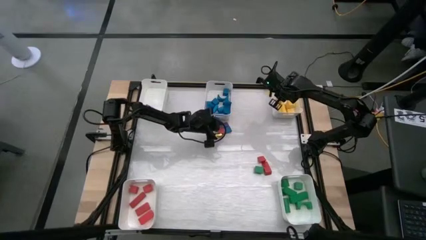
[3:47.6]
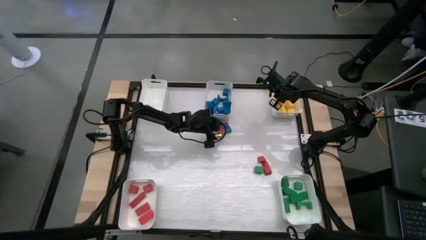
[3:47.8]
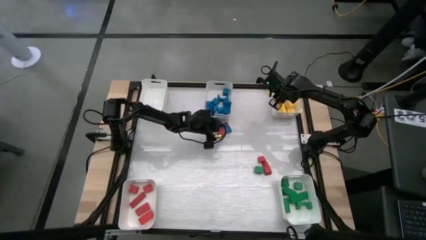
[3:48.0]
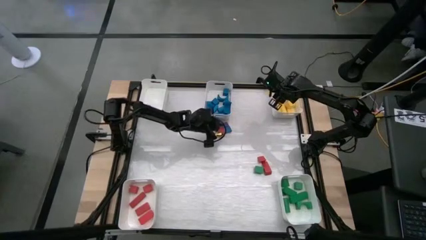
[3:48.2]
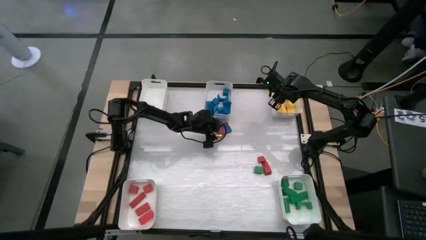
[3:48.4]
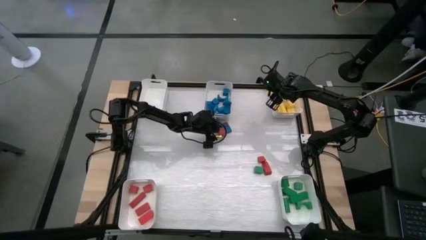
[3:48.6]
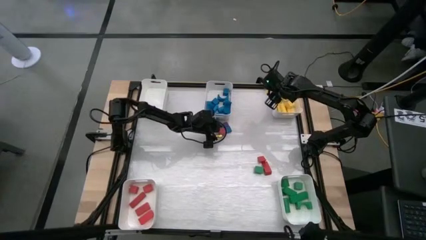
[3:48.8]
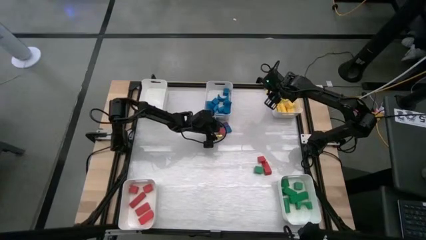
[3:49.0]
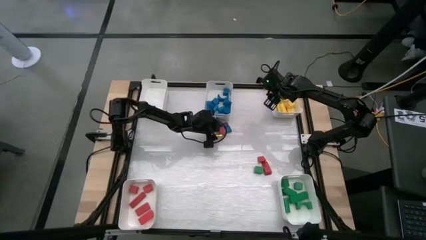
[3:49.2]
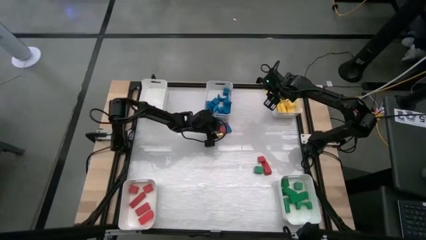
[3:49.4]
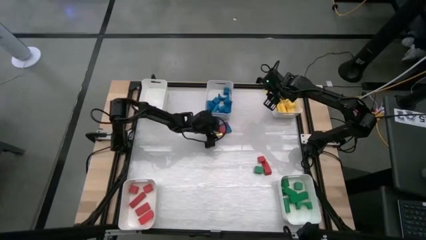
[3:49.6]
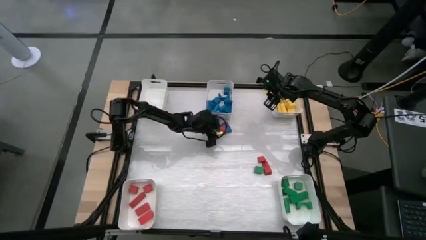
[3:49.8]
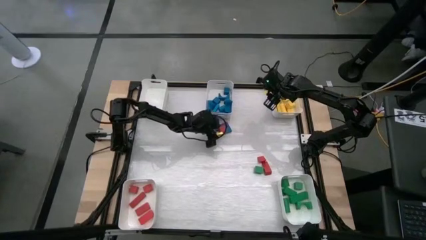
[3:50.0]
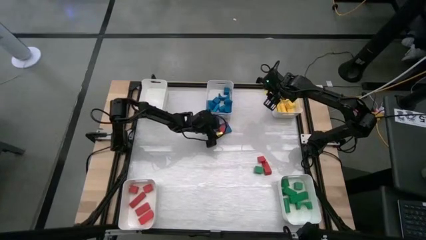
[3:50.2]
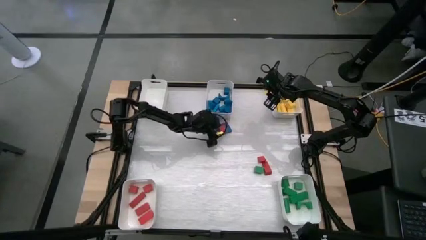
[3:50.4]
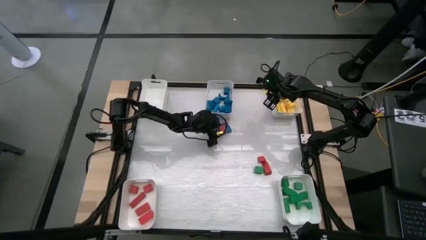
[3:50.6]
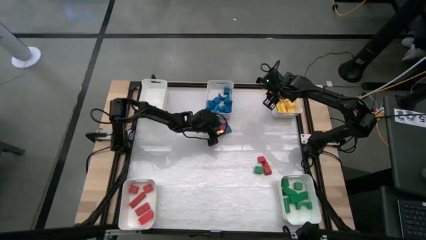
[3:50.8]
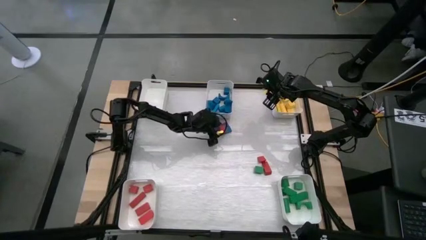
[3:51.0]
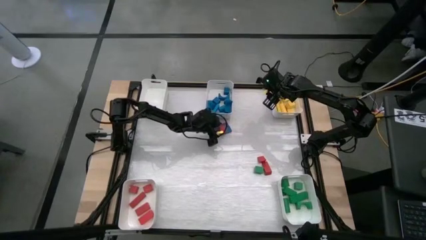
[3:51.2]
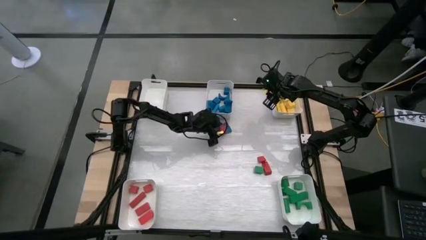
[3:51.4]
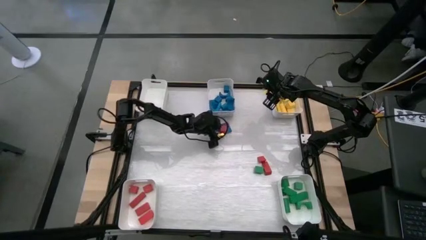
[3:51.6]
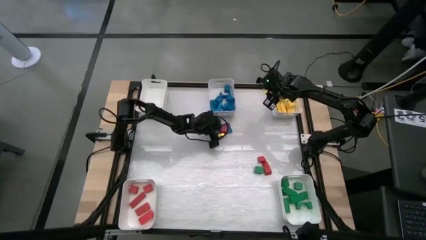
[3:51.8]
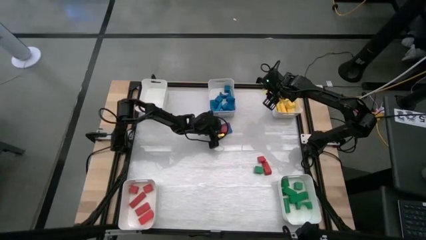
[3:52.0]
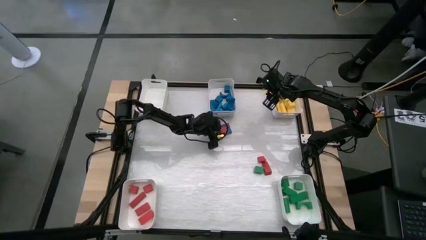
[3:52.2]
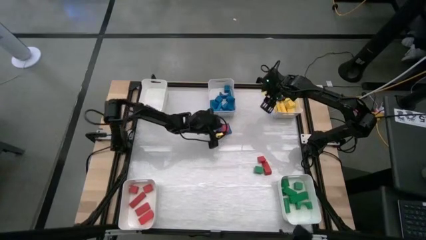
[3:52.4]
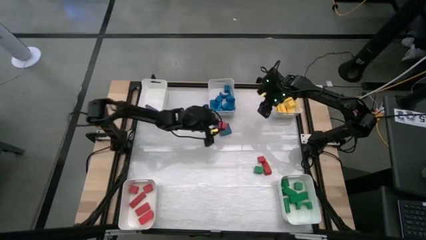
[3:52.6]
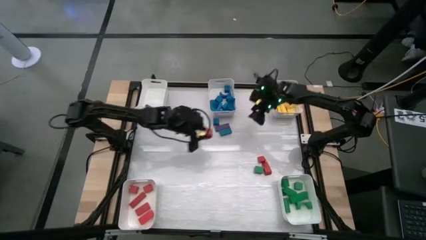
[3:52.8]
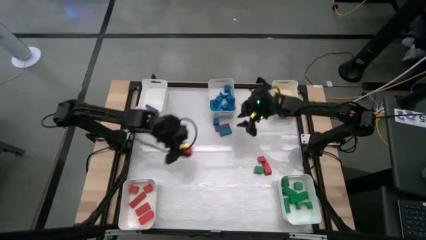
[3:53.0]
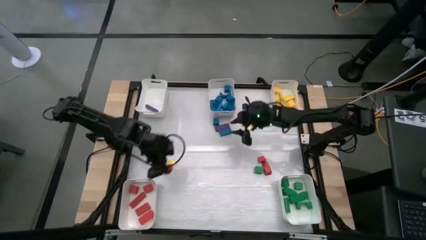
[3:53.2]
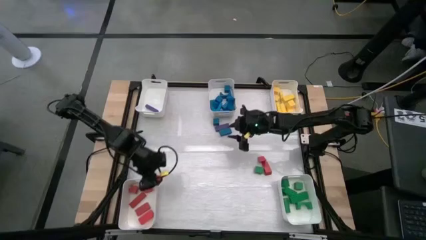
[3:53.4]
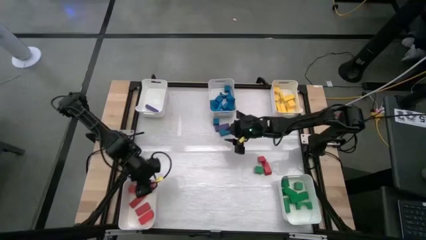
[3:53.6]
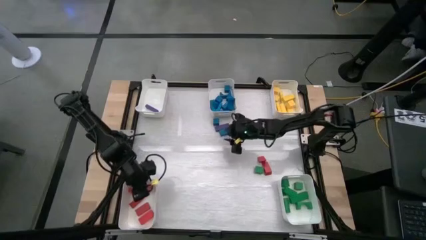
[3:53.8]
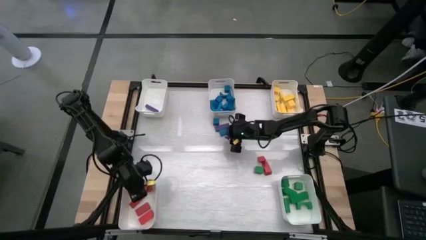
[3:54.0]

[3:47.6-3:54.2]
Task: Sort blocks
Put the red block into the bottom left white bin

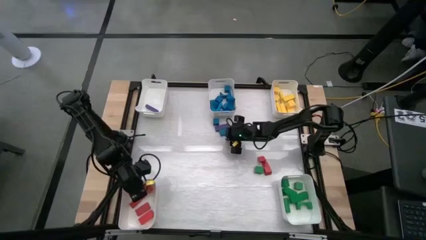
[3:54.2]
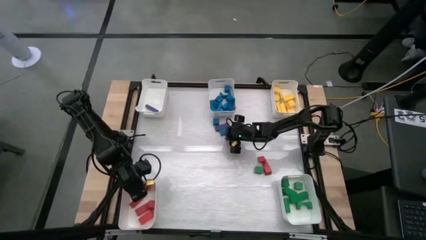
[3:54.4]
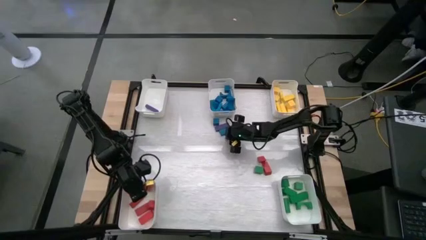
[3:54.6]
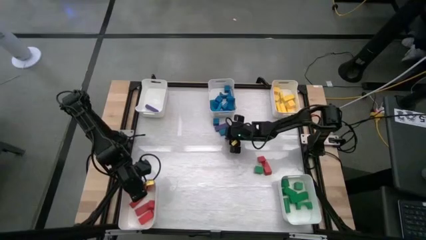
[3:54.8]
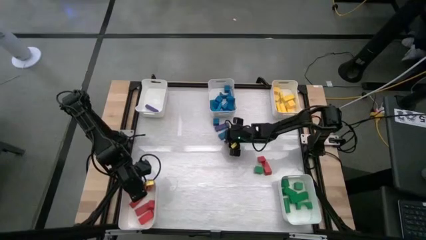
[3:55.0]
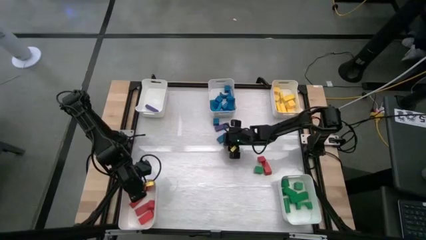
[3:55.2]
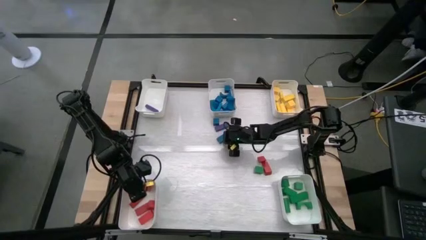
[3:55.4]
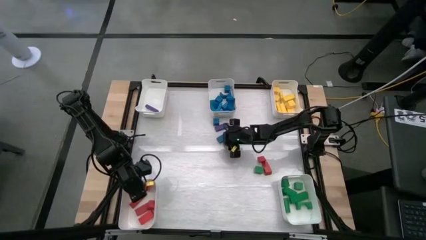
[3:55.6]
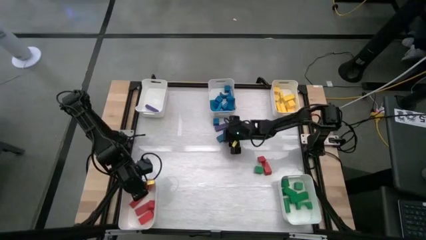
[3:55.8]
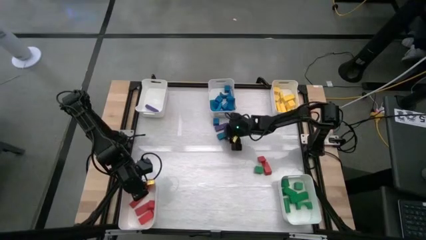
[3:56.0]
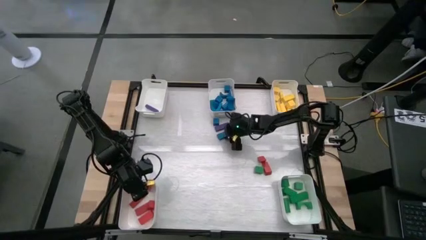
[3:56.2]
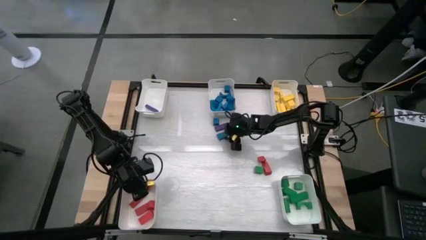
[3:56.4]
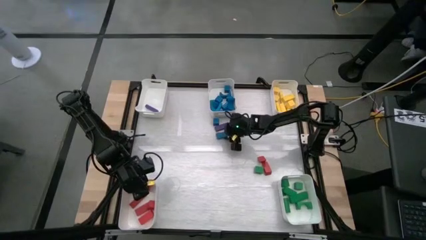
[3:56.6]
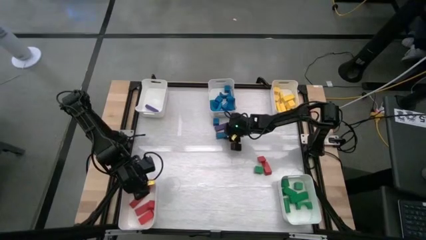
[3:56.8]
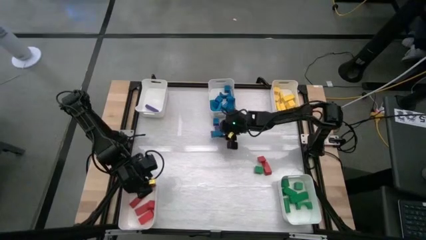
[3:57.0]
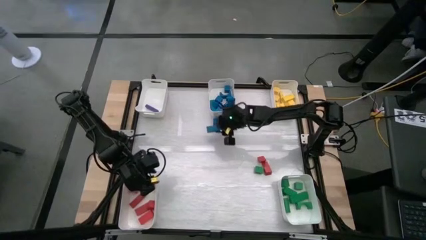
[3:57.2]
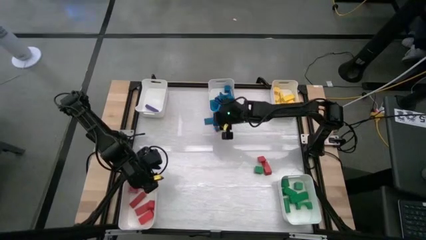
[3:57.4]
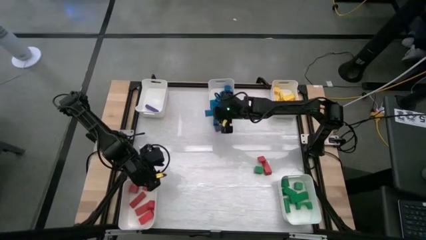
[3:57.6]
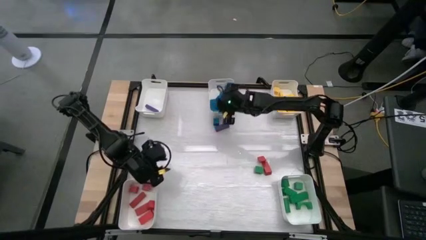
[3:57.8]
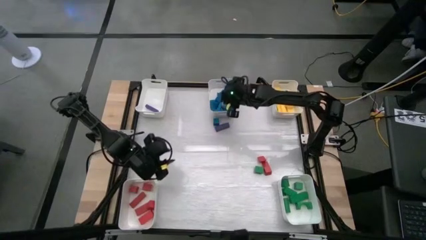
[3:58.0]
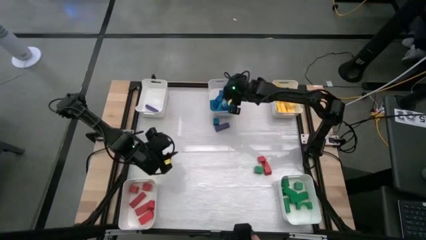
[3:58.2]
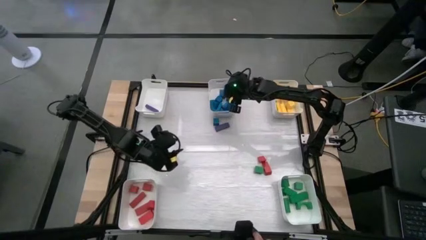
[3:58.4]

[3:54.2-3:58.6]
Put the blue block into the top center white bin

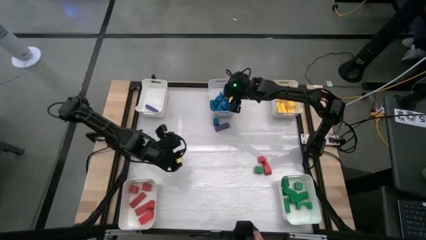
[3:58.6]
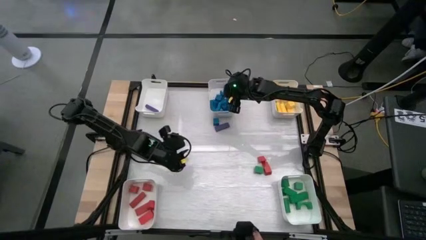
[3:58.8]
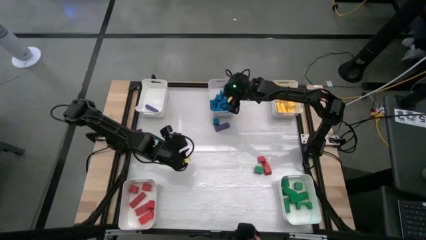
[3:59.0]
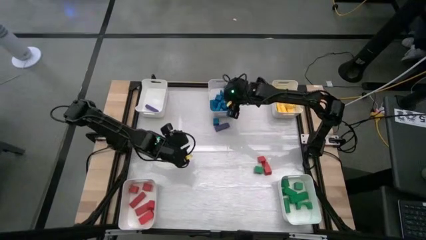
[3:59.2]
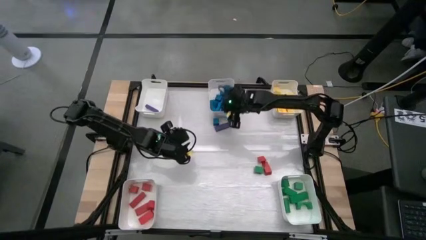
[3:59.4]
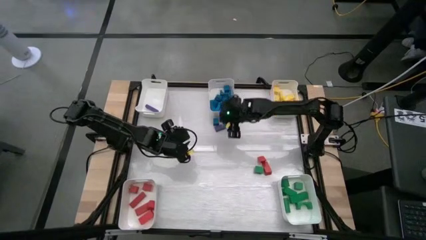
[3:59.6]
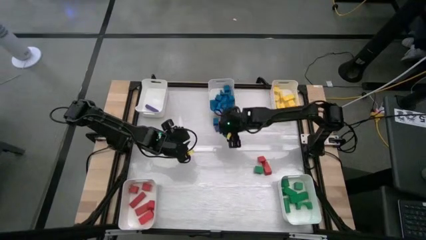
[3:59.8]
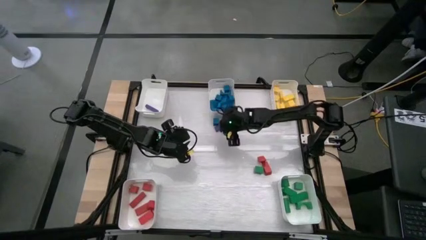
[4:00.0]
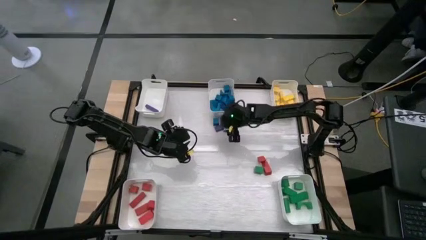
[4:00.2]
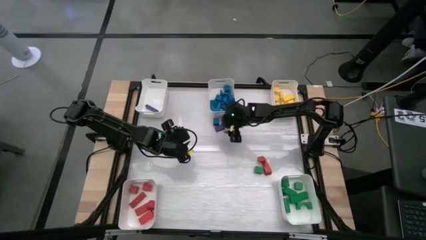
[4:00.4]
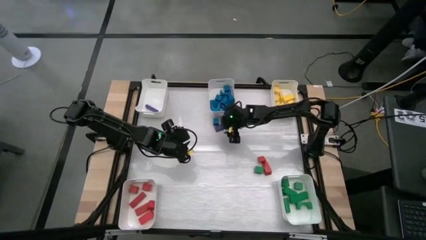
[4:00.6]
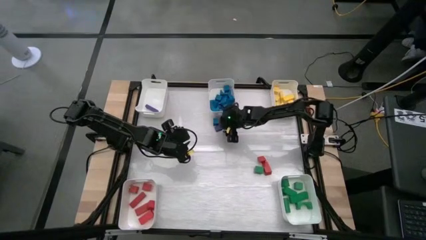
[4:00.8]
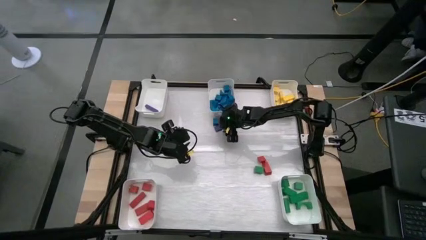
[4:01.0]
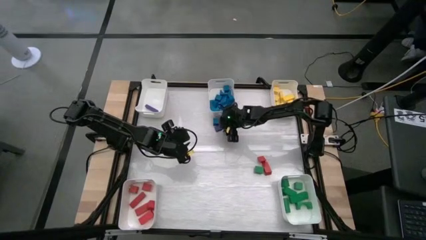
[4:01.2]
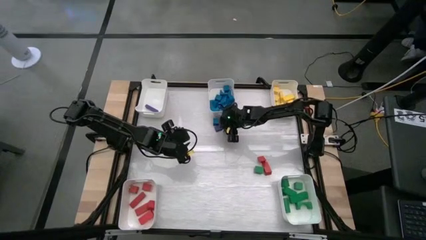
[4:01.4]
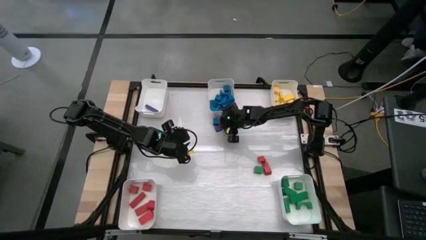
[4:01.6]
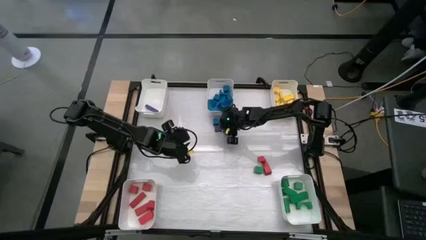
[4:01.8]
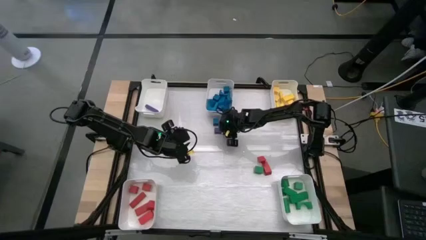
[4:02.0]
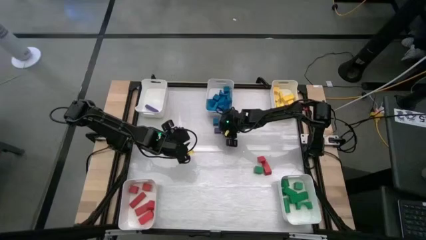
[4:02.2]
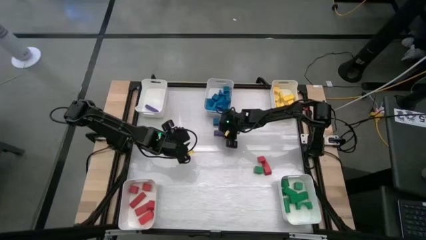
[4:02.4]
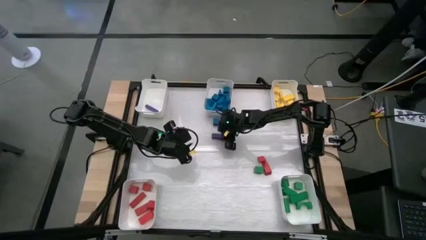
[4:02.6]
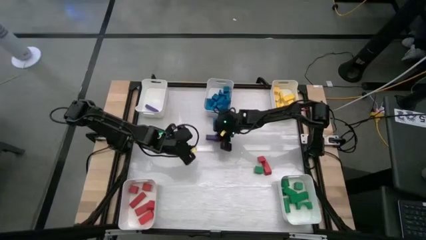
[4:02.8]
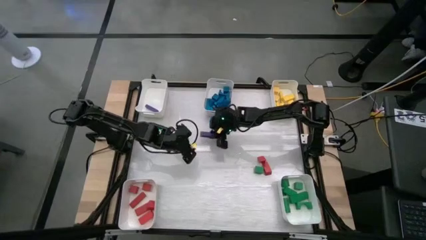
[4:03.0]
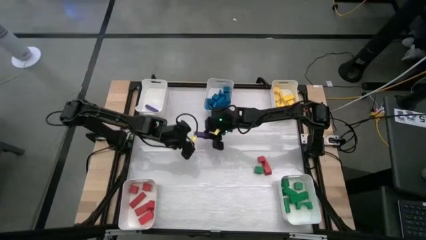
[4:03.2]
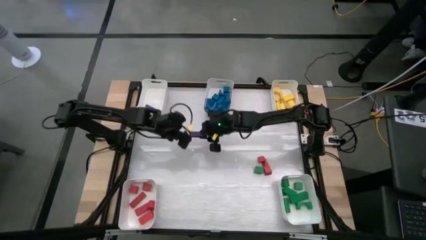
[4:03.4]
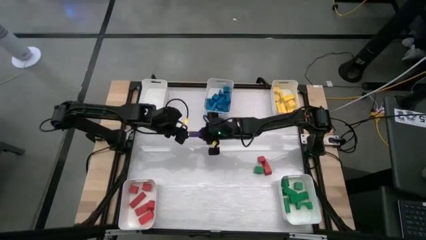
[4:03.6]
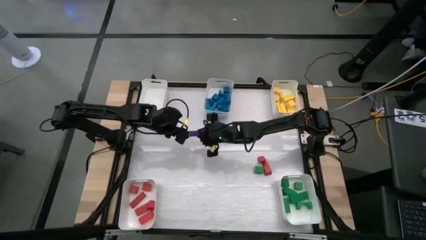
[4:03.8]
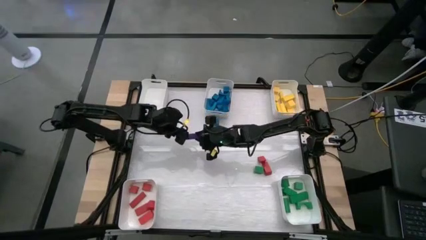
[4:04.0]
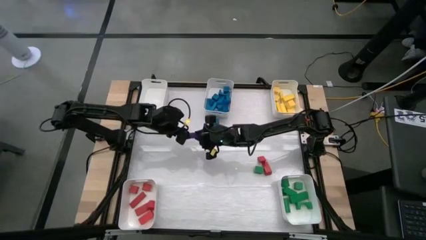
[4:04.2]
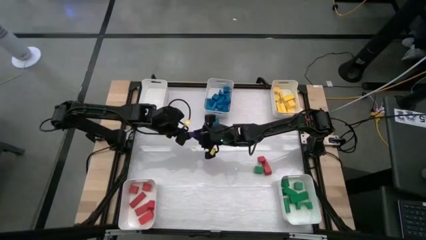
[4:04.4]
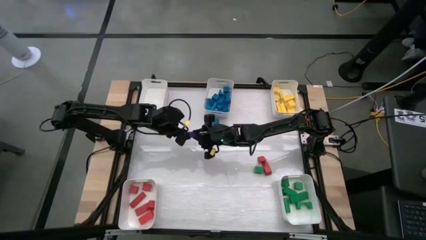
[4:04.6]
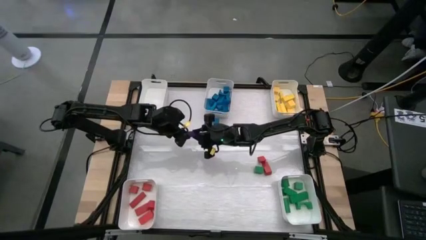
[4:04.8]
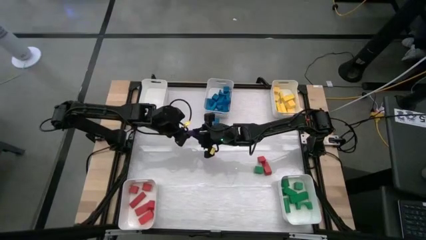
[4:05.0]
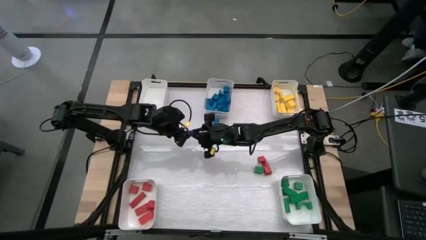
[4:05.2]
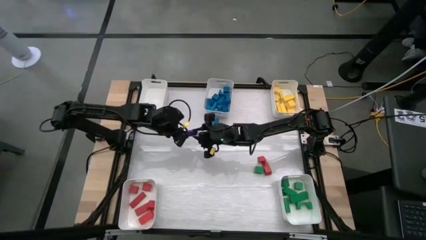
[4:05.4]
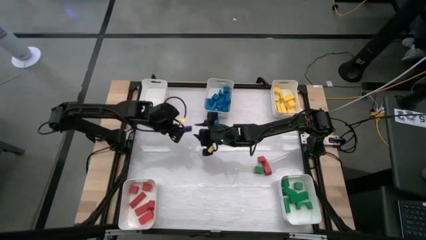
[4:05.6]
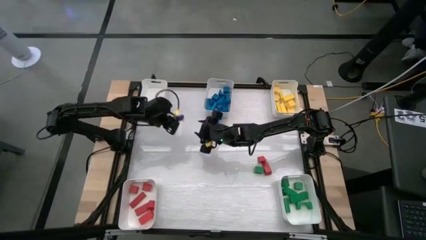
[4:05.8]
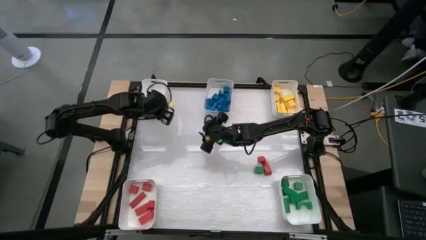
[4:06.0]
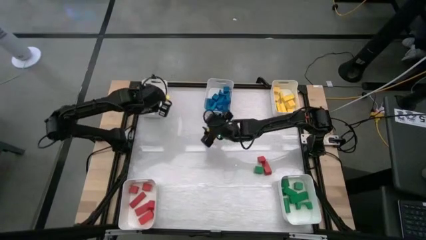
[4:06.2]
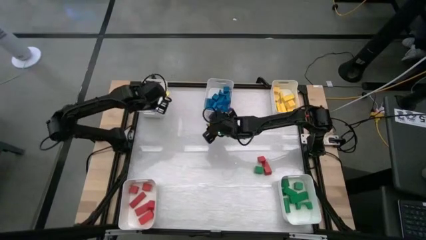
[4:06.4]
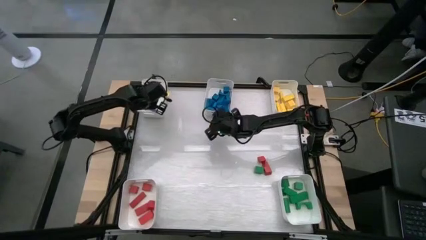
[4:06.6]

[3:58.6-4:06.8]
Put the violet block into the top left white bin
